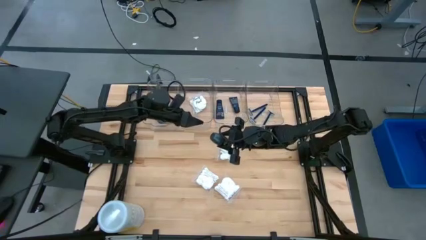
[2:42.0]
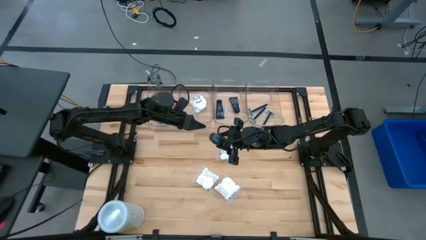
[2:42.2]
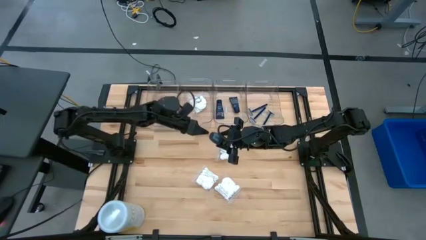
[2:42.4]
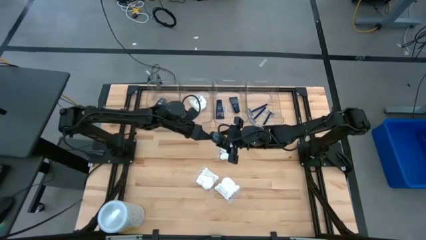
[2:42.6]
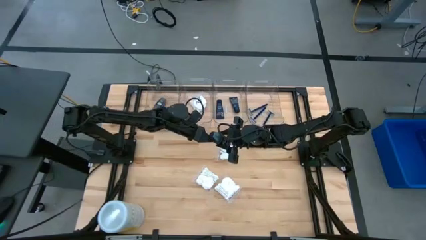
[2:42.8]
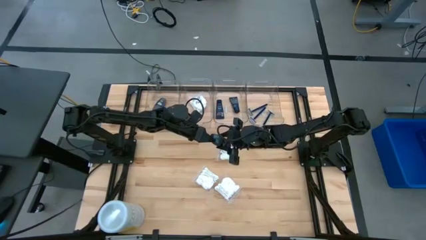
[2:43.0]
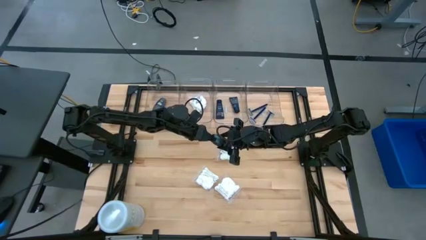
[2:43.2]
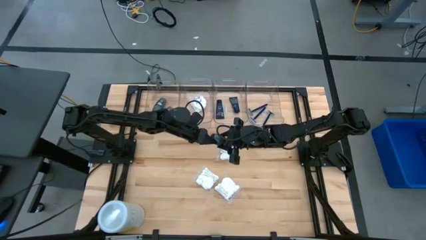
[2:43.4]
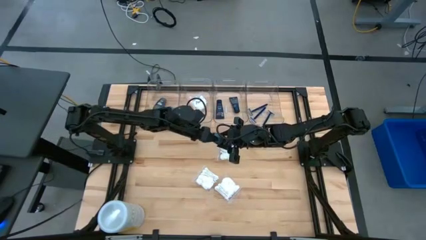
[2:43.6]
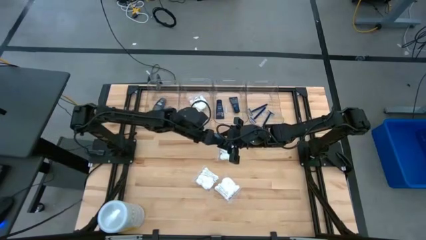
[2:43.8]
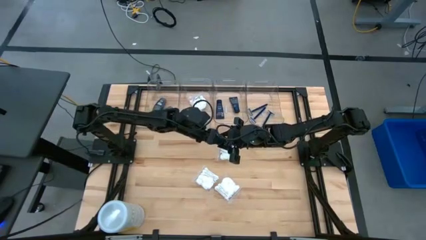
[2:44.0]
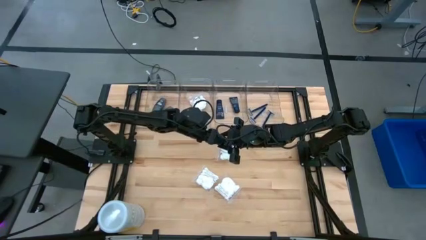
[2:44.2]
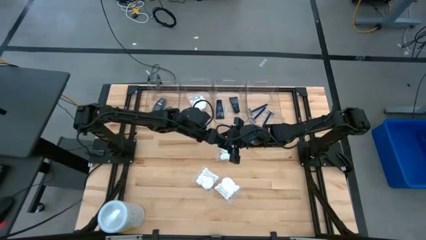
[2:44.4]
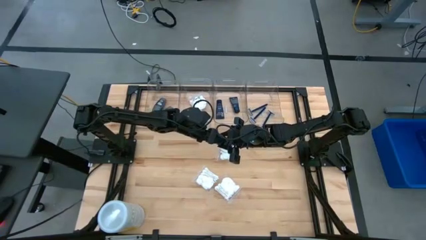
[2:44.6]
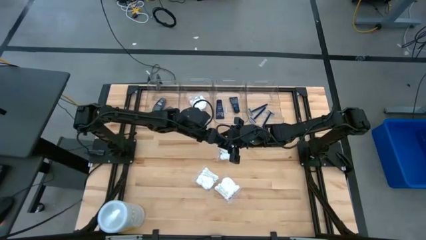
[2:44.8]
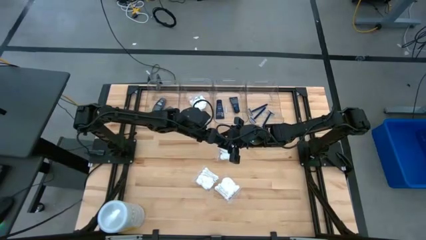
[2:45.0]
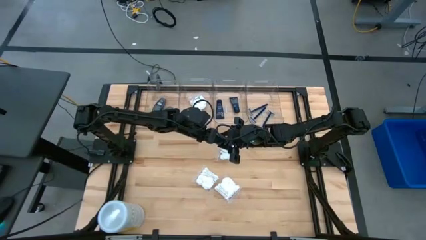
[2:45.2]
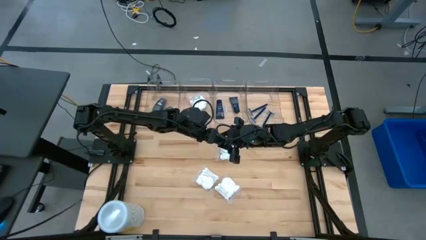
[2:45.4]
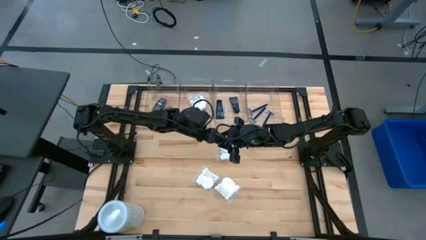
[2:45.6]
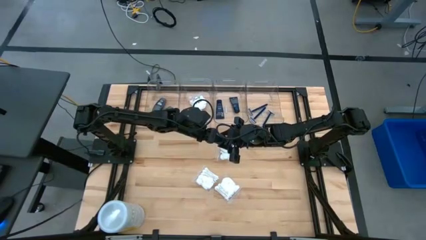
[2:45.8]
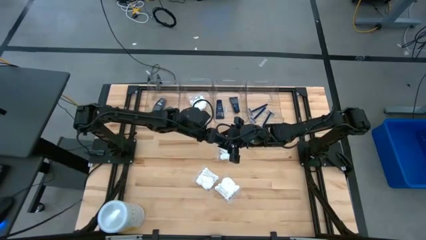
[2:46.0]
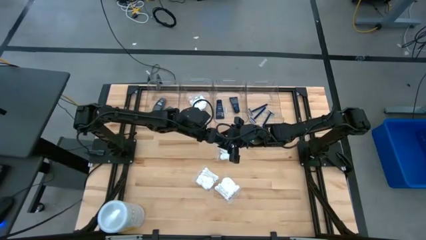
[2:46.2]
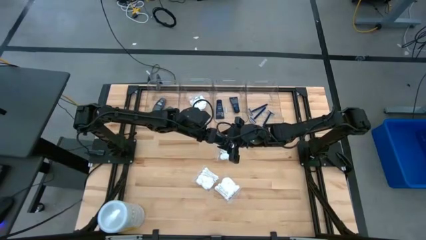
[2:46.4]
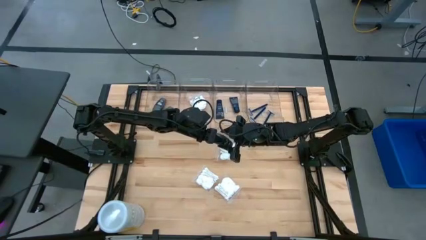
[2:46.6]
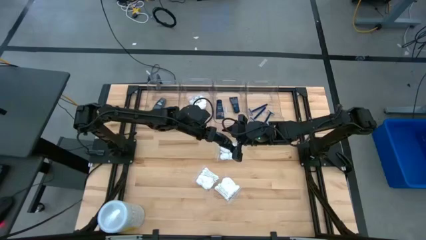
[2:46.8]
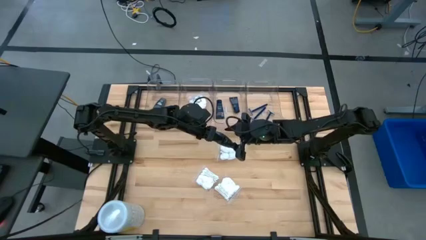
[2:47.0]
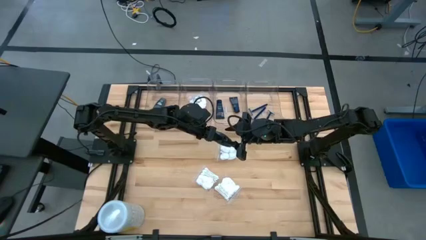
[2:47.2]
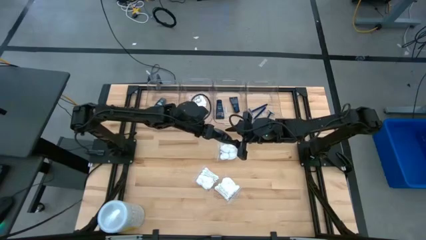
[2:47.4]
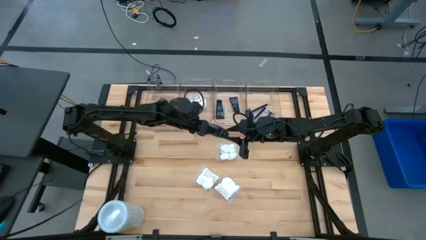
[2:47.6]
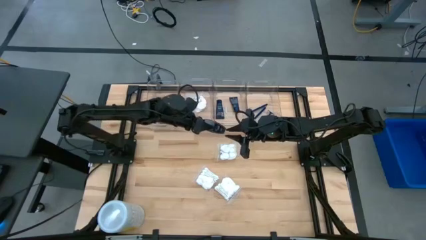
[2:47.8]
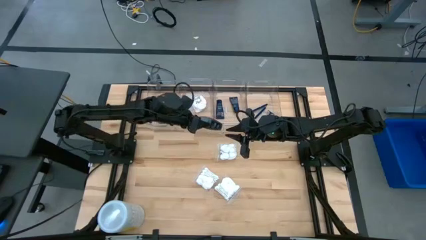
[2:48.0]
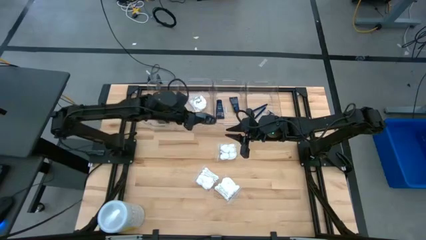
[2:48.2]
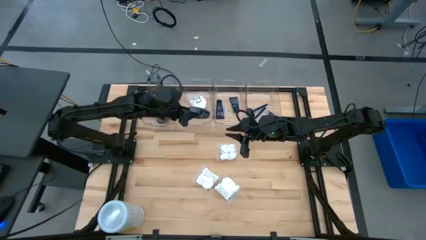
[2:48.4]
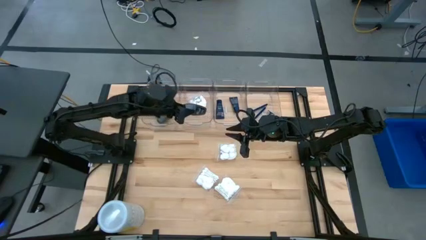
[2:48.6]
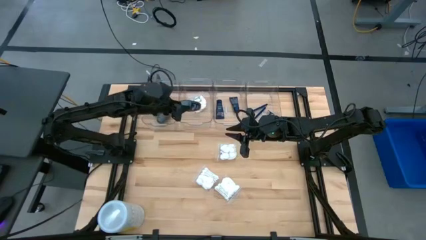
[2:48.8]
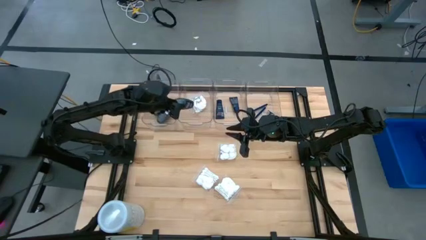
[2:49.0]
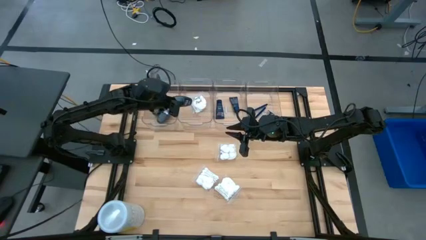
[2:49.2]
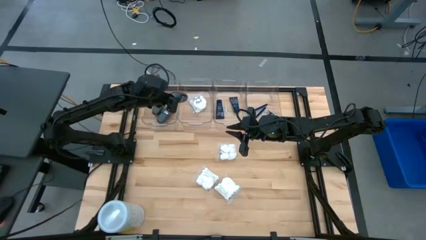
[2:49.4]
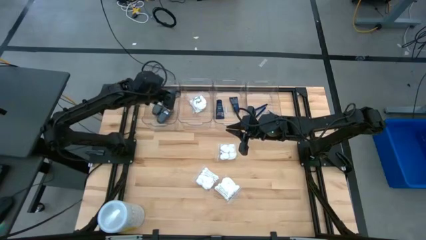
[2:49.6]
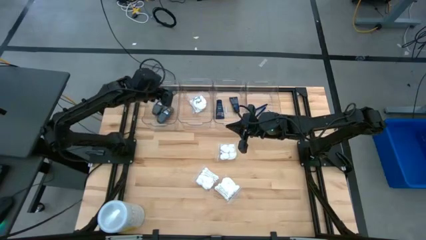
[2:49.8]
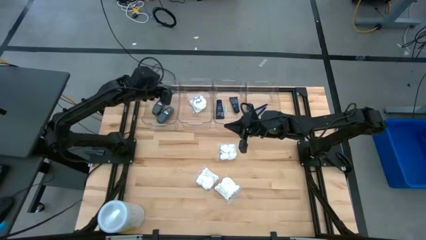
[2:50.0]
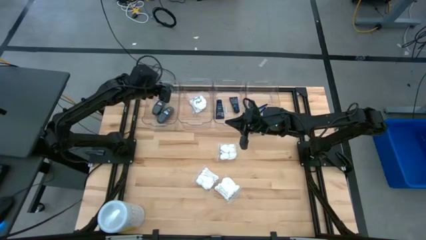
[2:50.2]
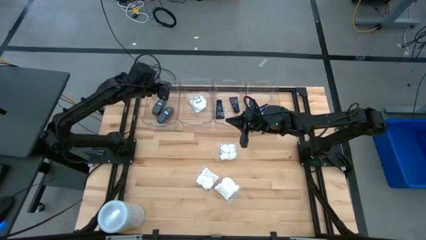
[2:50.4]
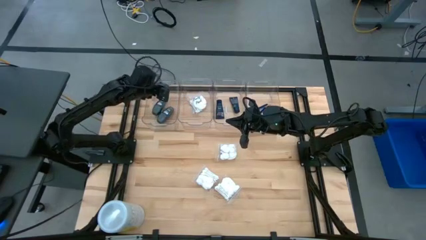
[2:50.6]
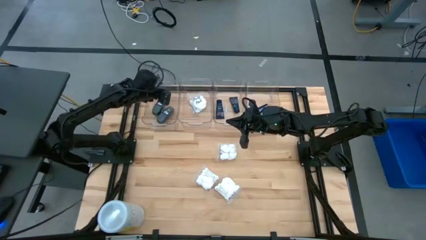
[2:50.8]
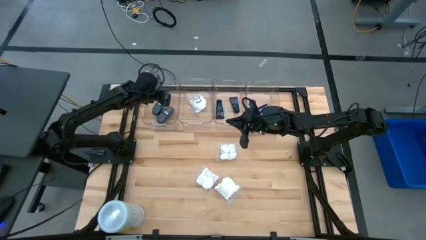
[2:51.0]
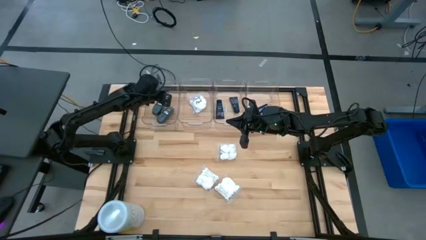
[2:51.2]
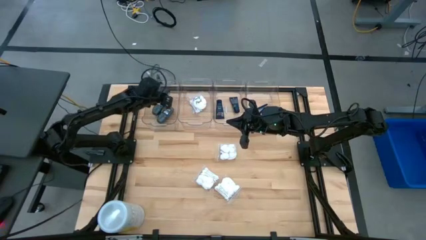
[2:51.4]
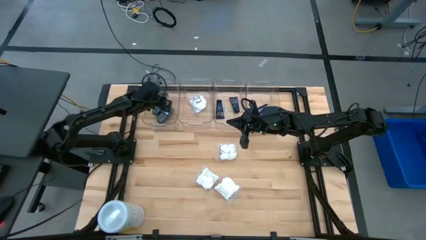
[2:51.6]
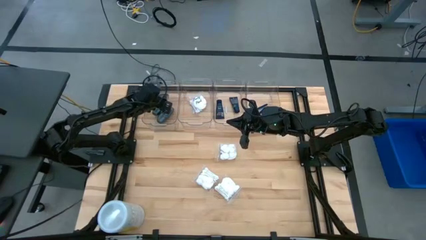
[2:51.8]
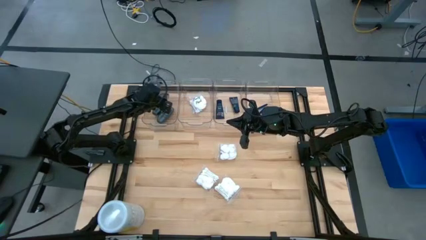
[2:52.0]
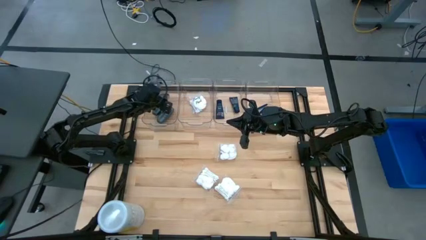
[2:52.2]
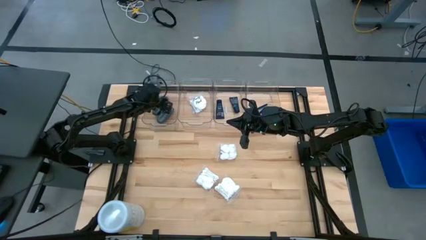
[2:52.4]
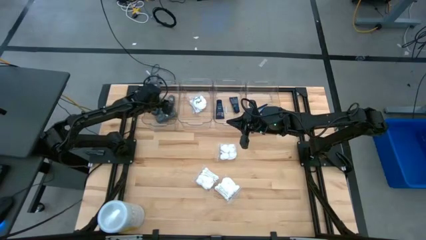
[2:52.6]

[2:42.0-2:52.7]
Task: Pick & Place Travel size toiletries
Put the gray deodorant into the left transparent bin

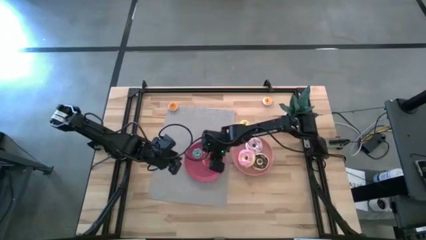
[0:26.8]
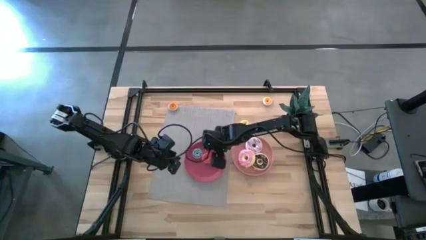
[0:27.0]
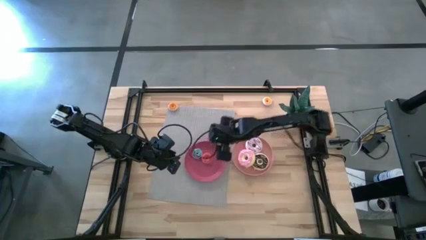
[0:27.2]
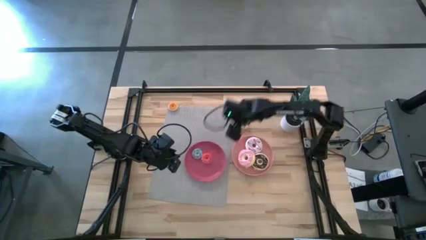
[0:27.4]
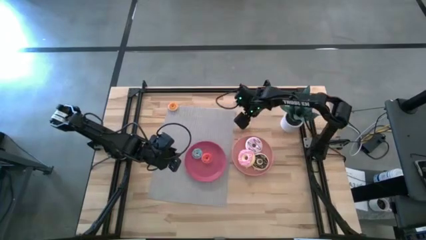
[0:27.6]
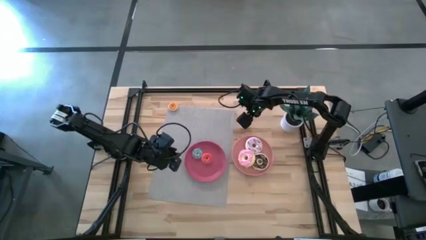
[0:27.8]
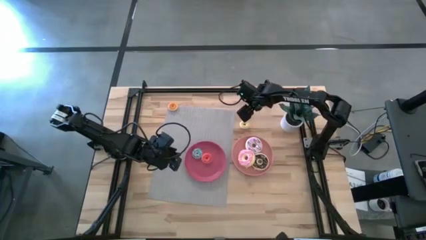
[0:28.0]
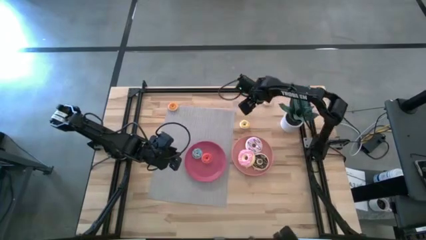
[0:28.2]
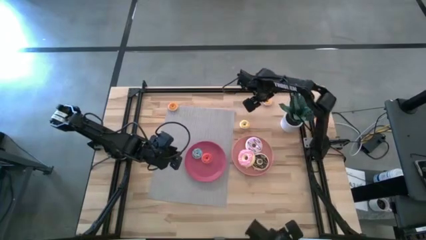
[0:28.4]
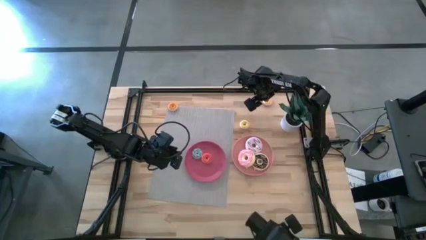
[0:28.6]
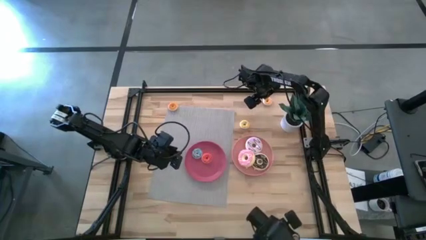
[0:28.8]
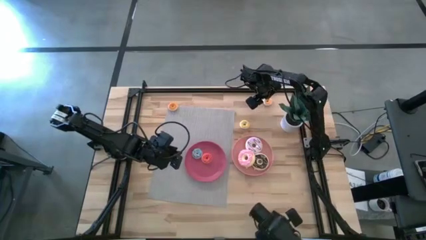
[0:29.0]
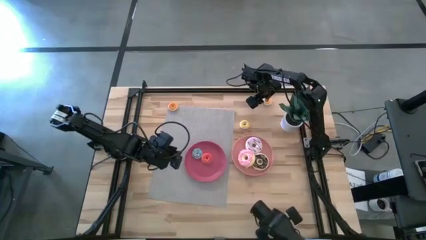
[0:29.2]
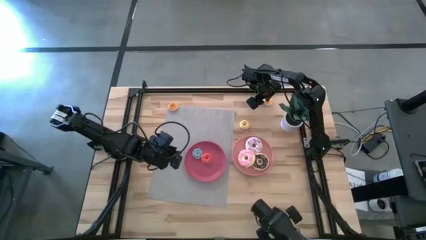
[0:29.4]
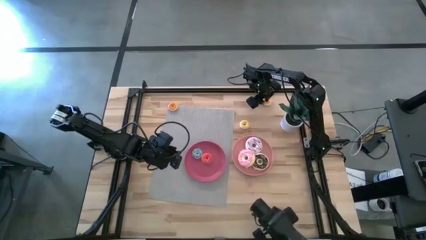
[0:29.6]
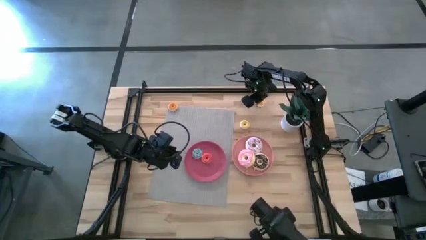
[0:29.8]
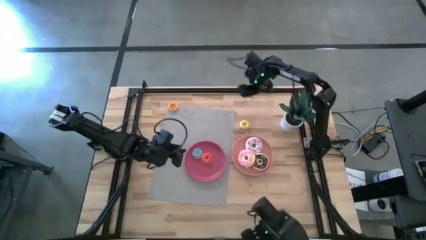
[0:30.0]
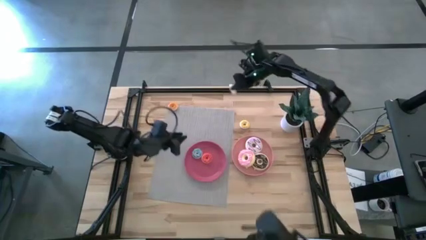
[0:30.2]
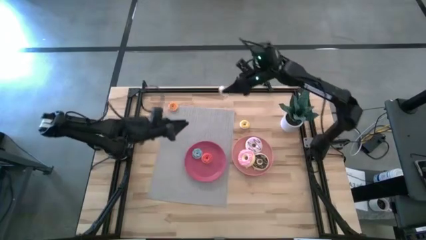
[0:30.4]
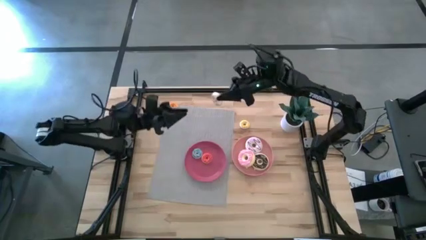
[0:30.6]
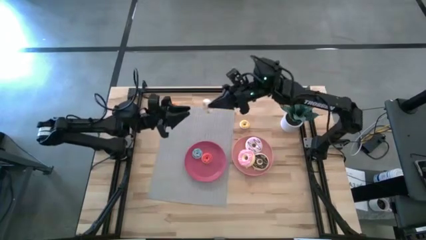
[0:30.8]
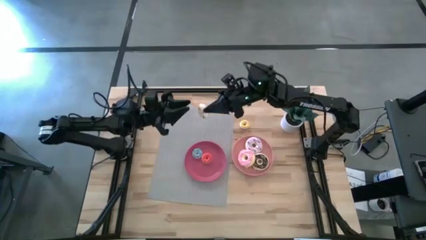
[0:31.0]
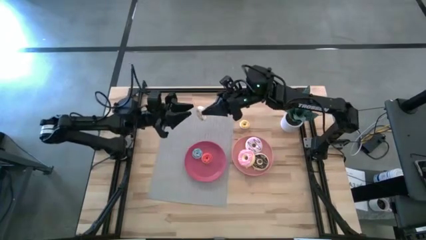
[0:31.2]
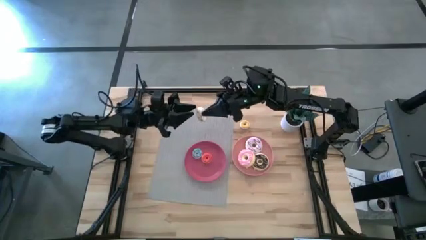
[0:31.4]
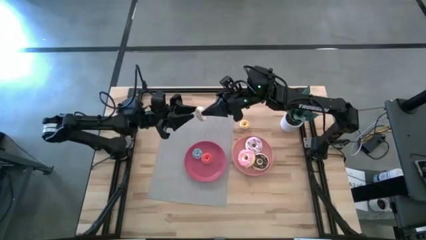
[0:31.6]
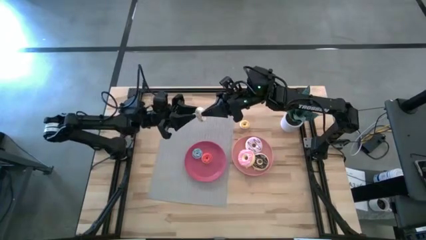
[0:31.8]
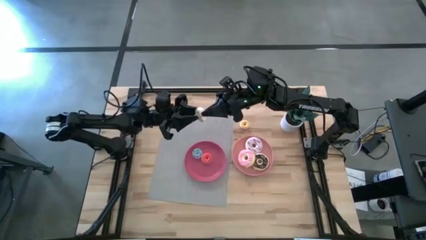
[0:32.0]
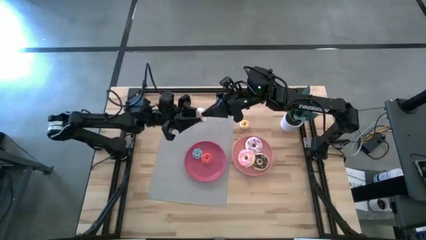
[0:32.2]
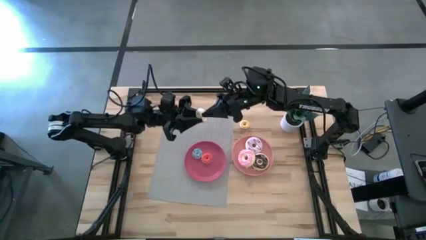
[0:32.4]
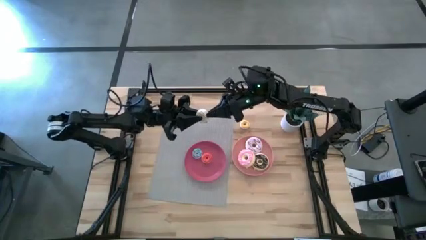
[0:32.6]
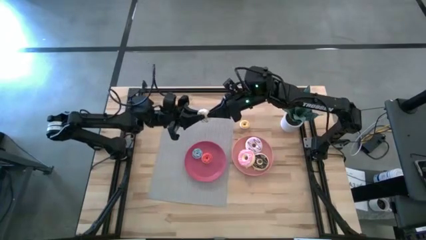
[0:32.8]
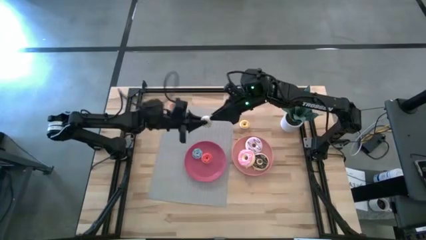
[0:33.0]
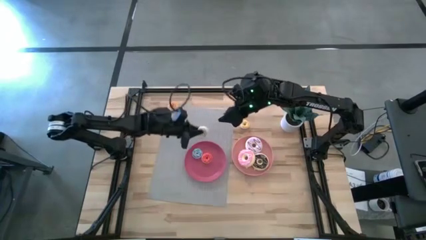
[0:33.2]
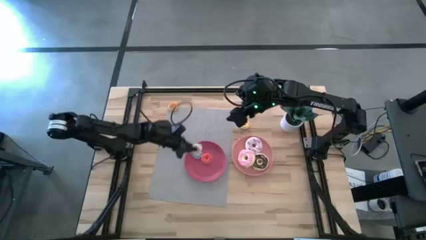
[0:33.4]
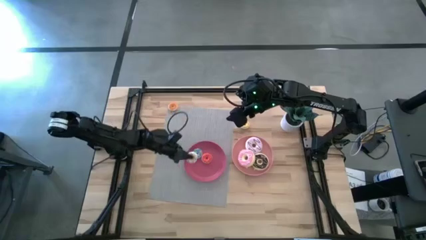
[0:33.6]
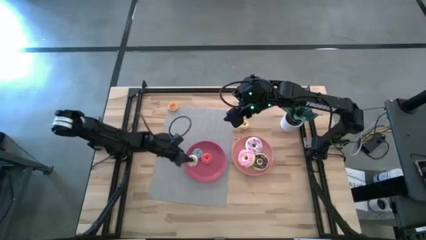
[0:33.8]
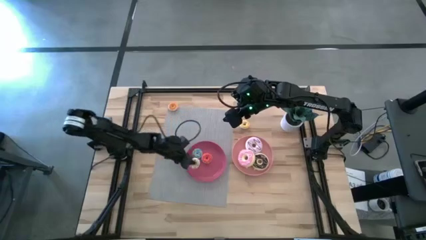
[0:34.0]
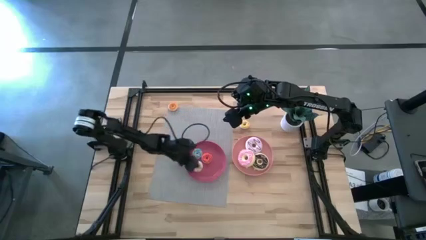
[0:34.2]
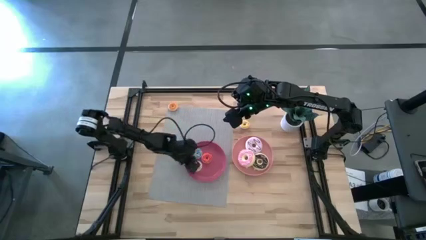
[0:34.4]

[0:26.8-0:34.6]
Task: Pick & Place donuts
Put the small white donut on the light pink plate
